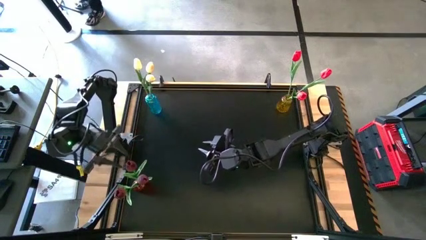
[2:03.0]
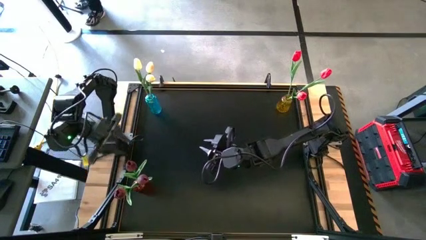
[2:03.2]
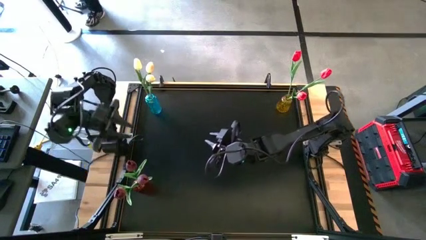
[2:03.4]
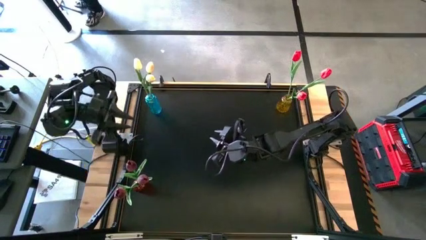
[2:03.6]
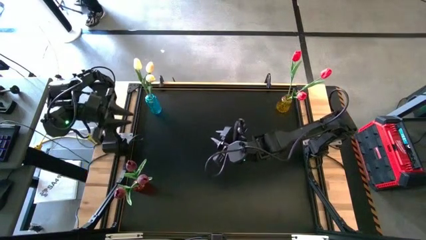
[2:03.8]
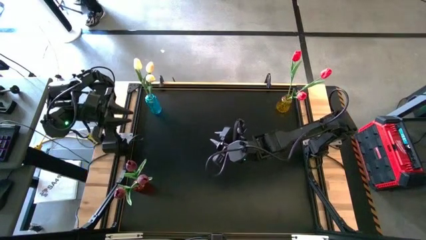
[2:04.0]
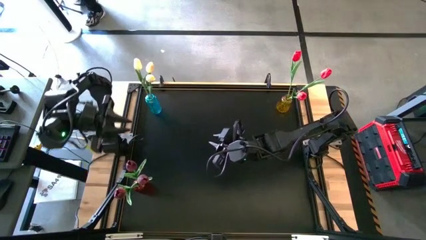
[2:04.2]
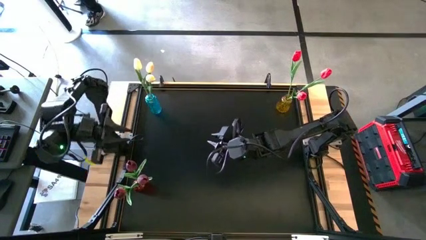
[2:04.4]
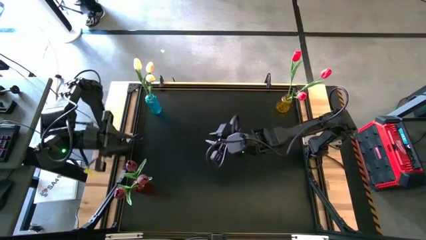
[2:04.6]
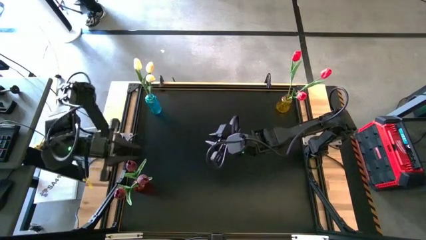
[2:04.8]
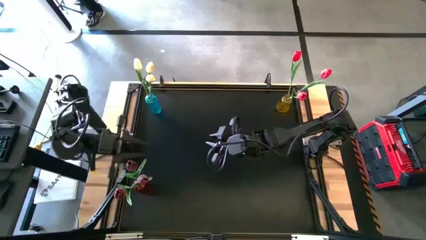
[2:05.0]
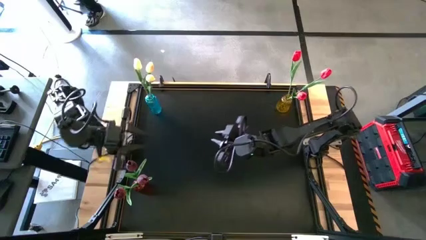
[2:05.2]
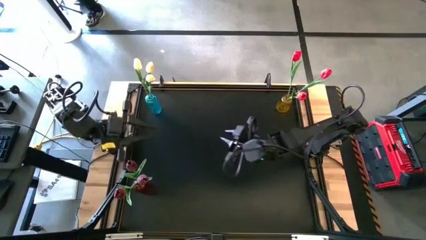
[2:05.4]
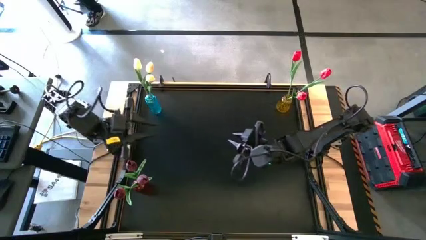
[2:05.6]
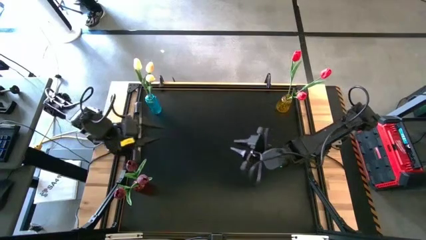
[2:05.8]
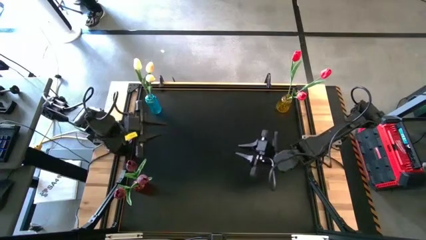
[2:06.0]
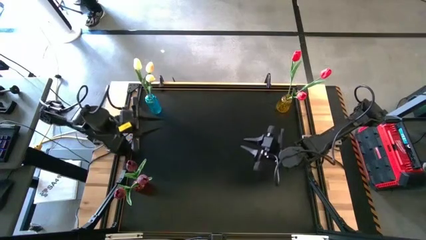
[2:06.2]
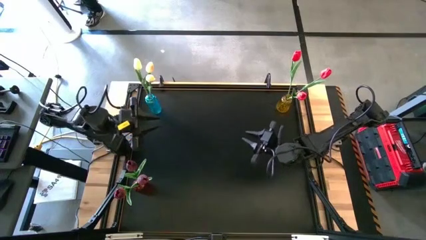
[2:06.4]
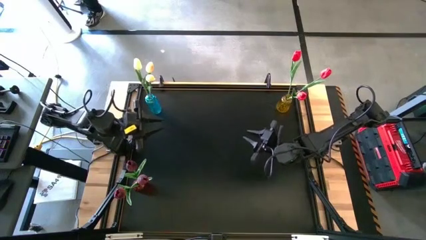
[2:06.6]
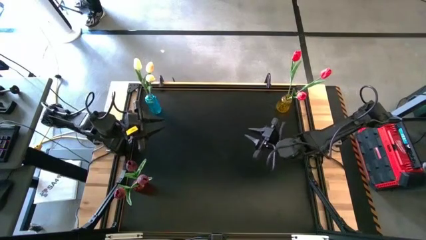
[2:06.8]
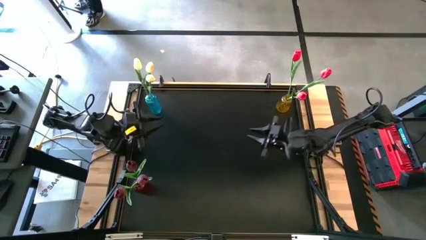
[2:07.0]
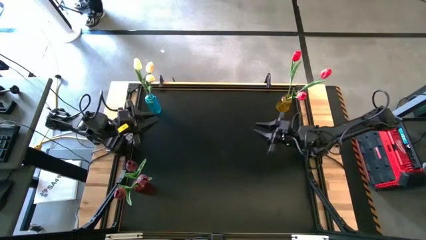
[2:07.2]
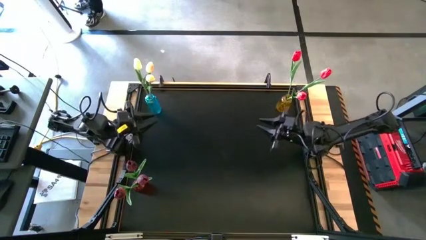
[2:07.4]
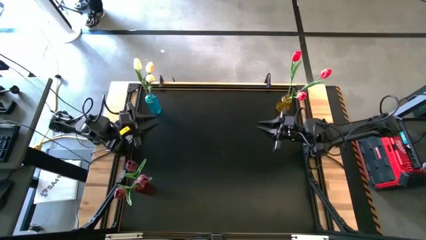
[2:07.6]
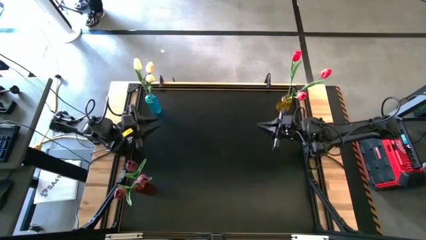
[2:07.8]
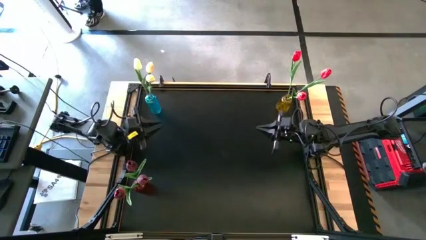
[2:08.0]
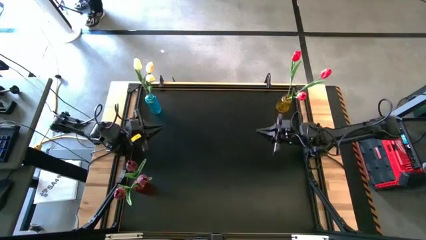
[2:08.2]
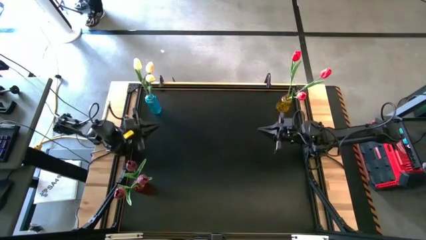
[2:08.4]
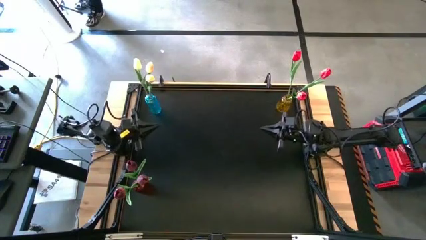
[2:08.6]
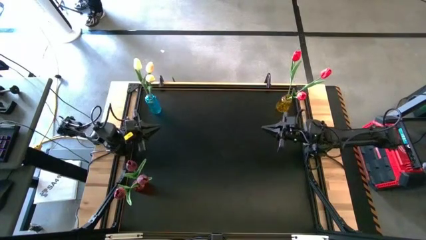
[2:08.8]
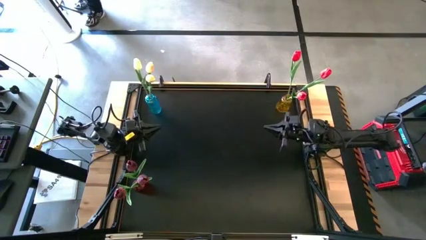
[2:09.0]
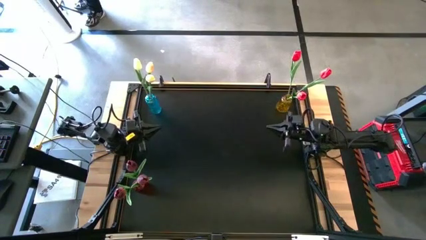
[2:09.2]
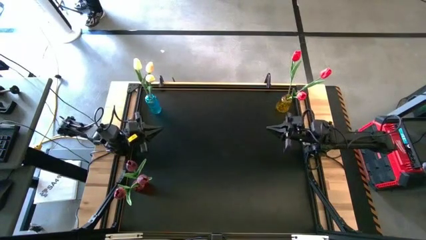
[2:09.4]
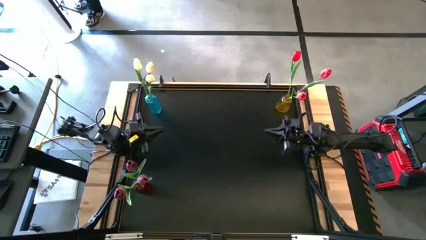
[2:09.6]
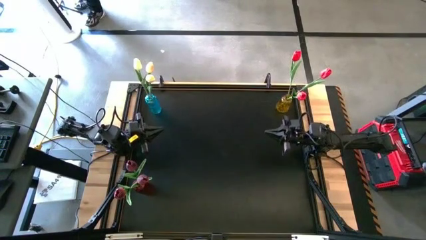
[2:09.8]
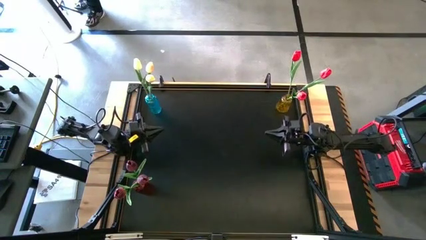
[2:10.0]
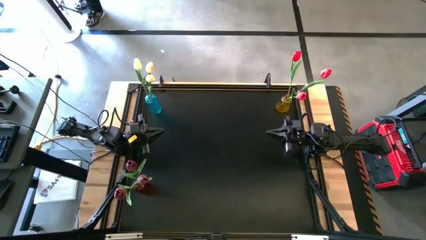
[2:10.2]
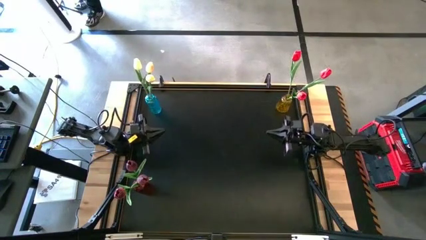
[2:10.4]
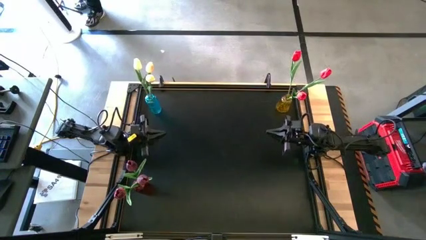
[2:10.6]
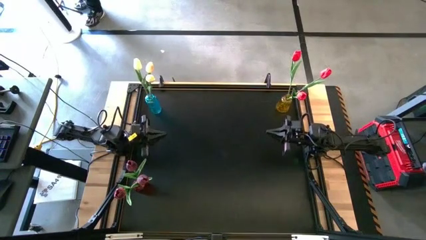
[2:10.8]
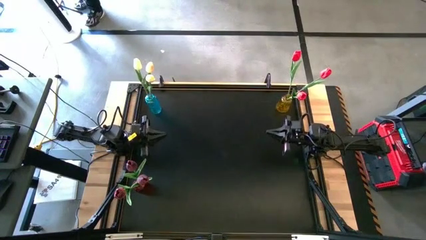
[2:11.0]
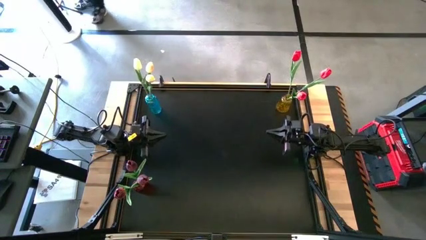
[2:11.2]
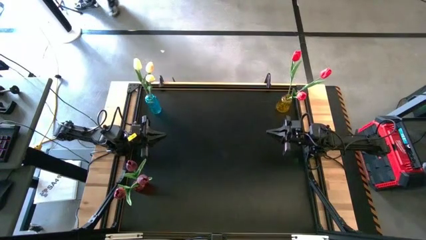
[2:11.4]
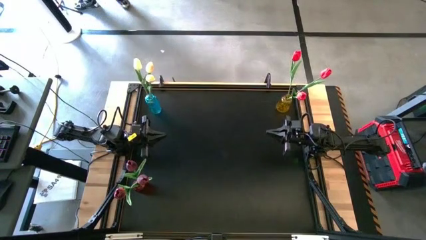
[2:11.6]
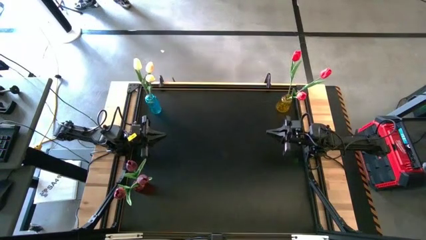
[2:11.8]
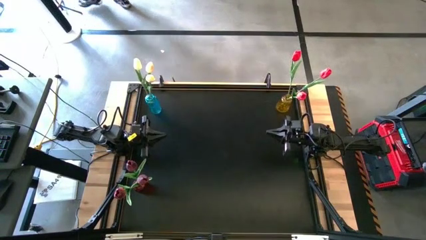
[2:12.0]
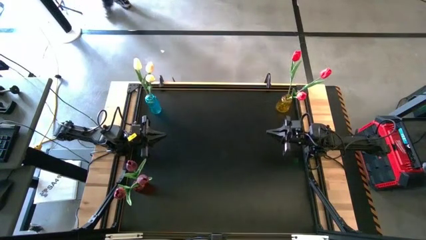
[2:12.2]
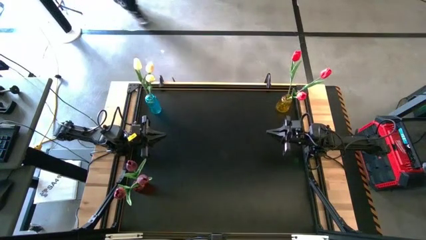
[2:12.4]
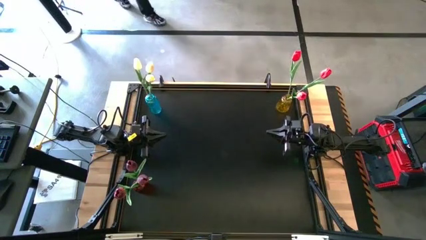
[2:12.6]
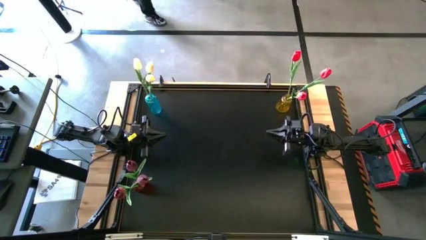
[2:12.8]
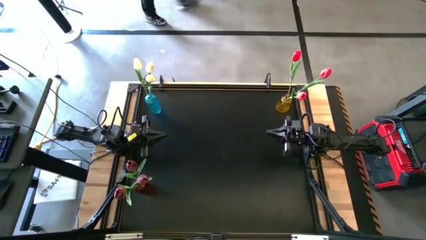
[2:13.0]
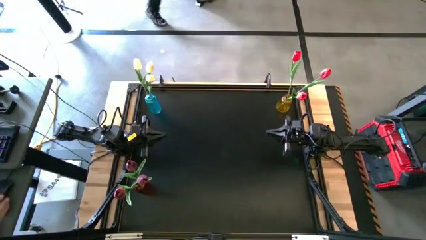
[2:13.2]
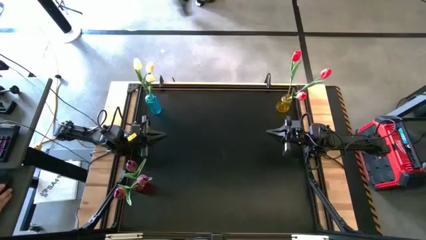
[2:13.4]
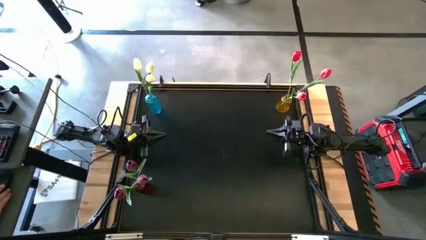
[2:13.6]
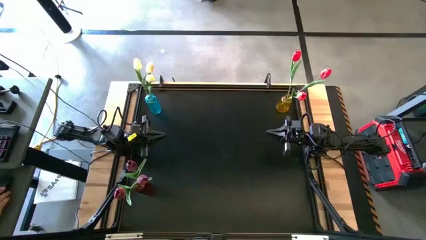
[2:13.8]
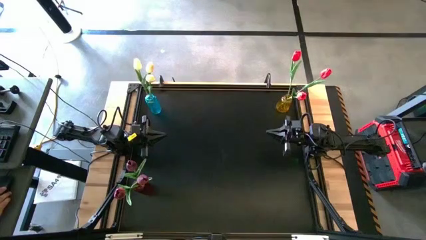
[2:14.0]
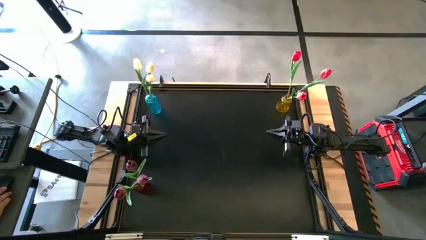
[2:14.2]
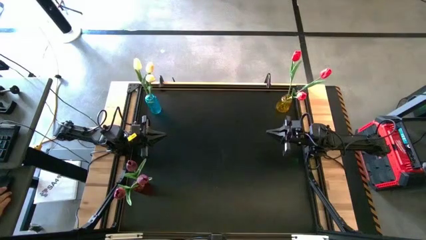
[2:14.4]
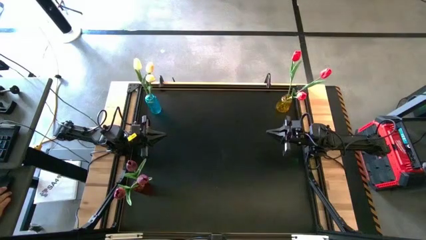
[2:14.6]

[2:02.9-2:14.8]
Task: Sort flowers into vase by color
Return to Home Position
